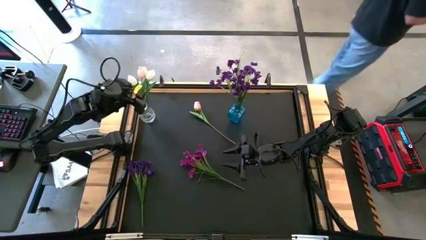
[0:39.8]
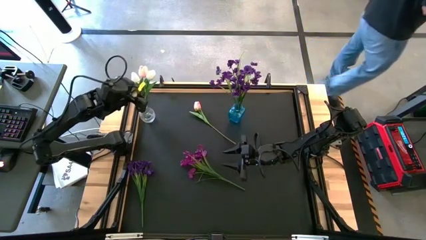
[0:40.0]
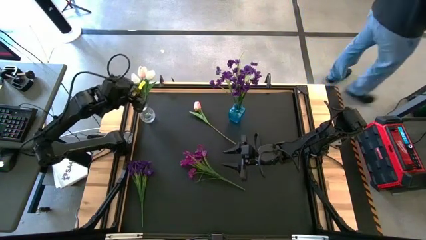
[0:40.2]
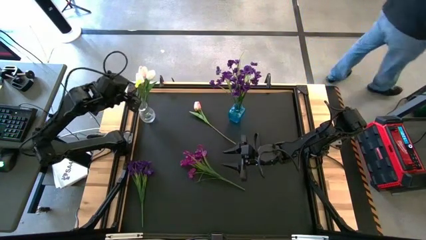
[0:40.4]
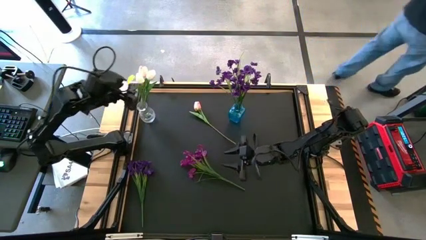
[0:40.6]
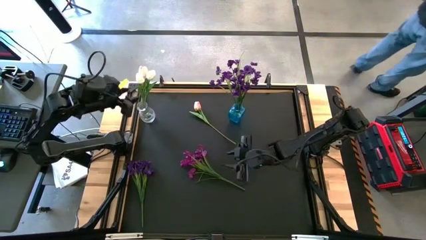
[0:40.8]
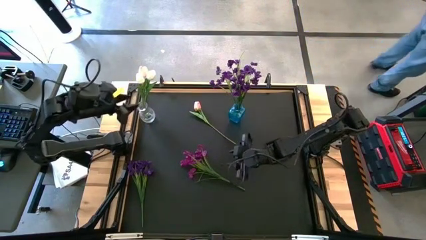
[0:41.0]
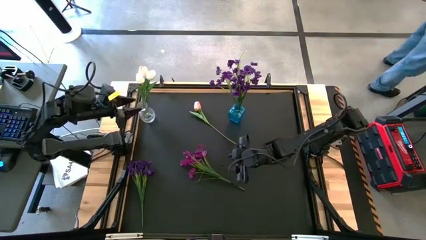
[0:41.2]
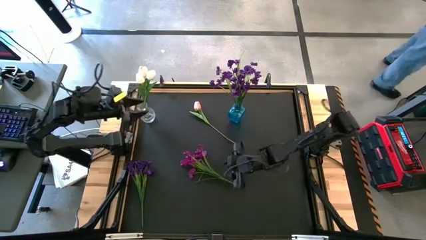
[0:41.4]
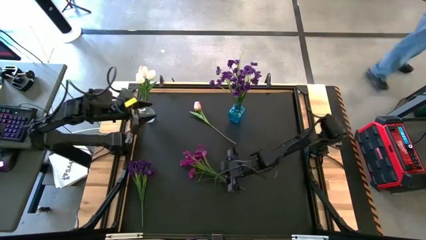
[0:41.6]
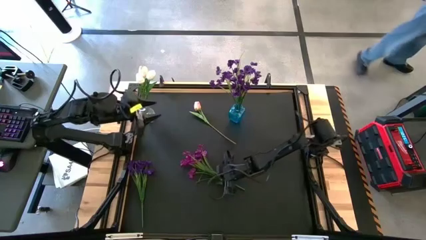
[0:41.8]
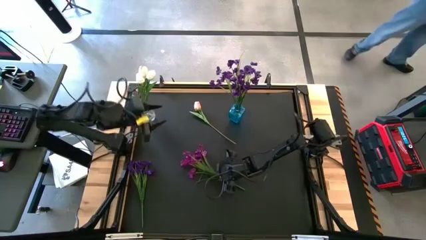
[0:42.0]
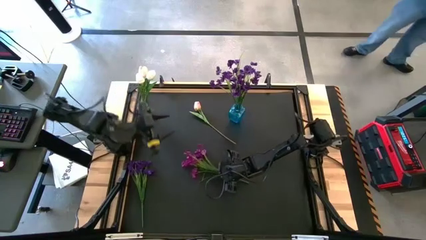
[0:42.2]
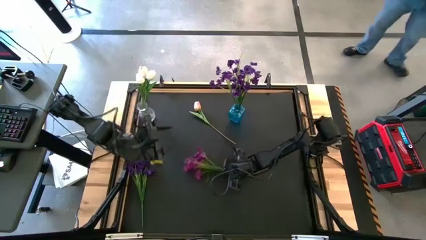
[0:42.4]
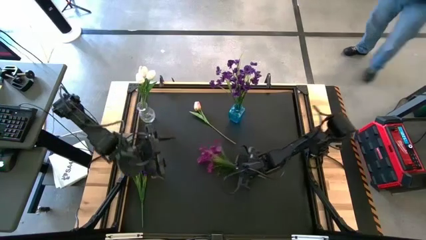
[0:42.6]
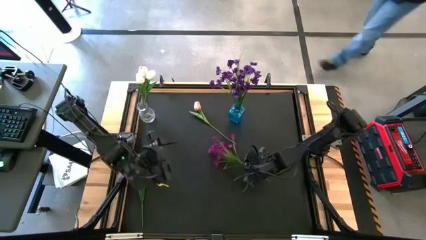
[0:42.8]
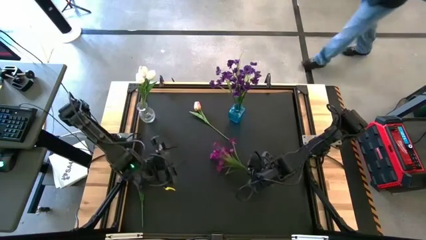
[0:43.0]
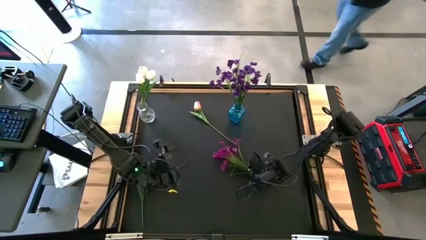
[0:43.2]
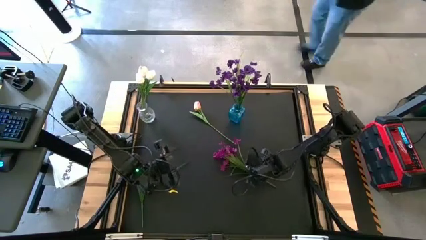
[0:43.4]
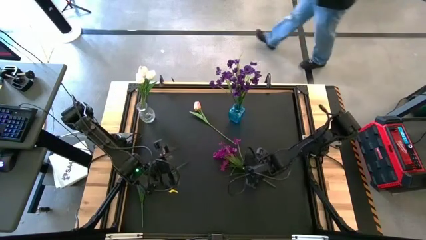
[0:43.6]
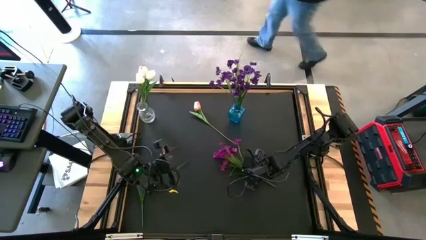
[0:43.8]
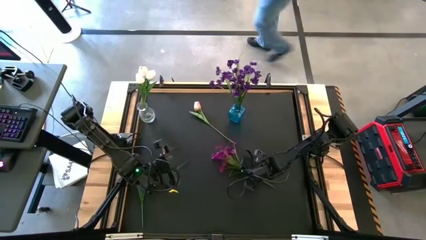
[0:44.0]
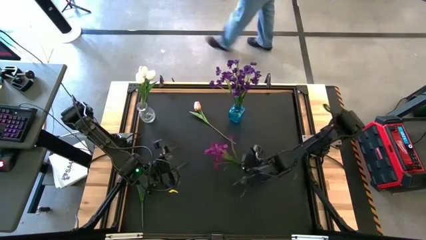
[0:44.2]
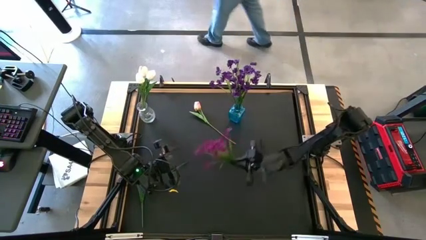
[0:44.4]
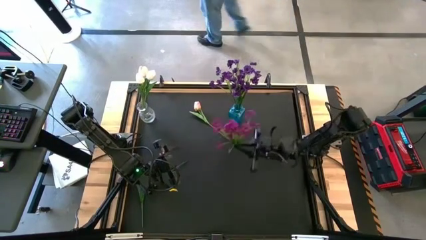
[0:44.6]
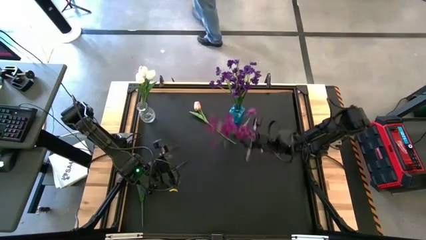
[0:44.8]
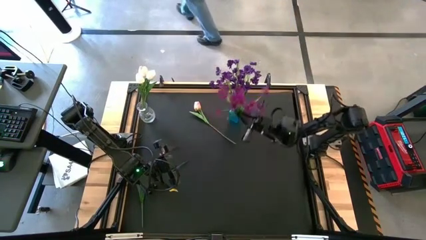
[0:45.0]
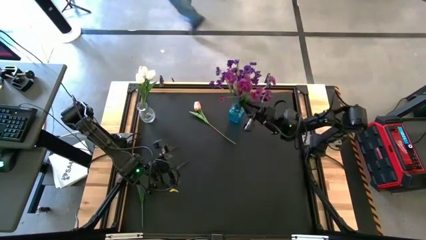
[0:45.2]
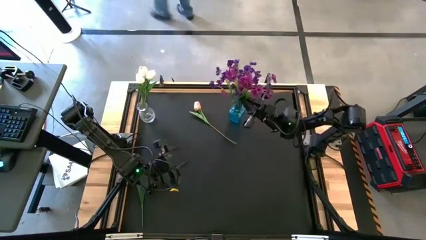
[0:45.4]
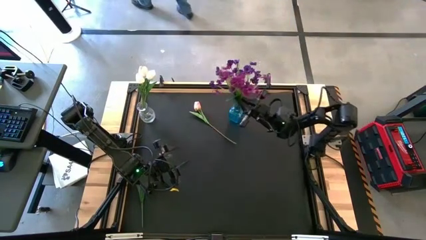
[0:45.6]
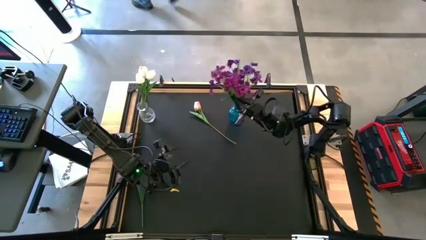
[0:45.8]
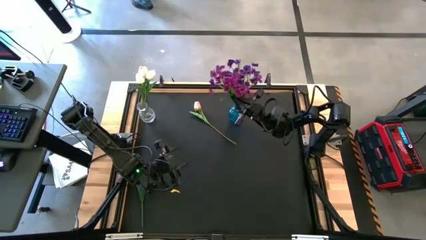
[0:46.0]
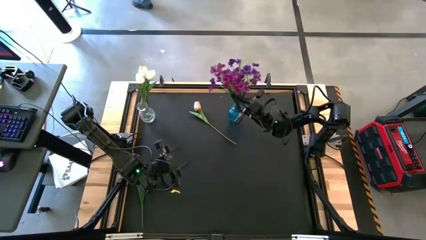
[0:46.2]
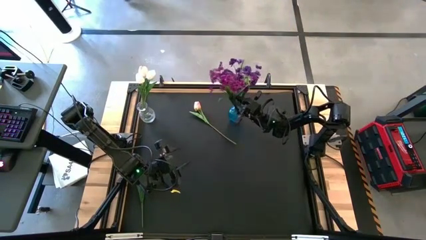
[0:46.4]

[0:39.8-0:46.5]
Task: Sort flowers into vase by color
Put the dark pink flowers into the blue vase

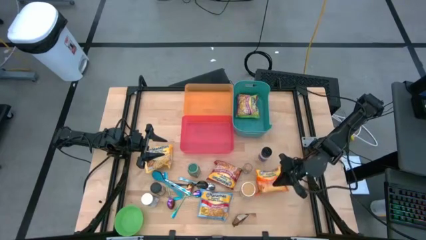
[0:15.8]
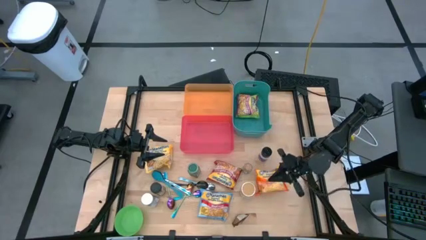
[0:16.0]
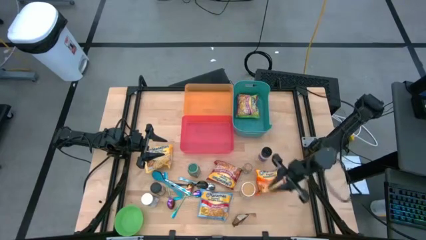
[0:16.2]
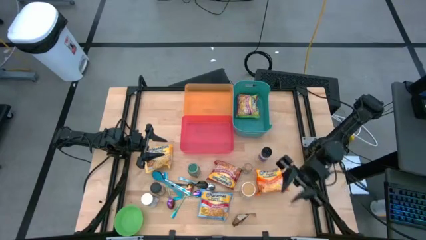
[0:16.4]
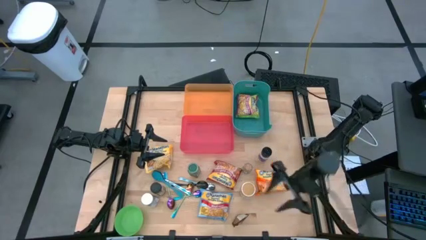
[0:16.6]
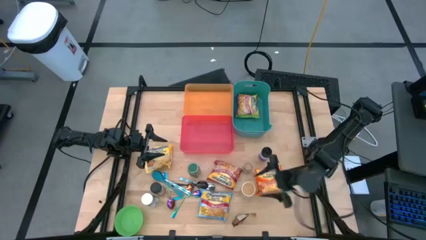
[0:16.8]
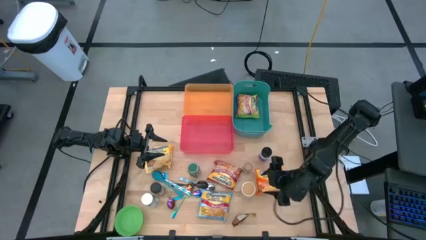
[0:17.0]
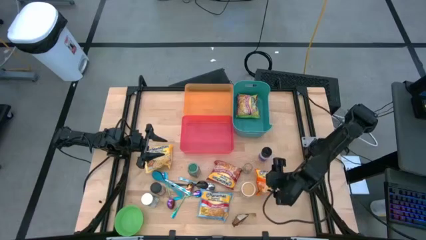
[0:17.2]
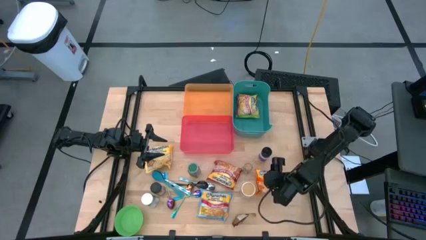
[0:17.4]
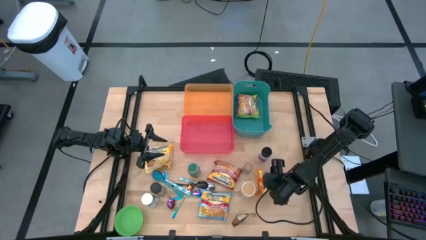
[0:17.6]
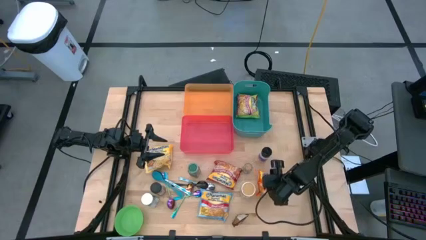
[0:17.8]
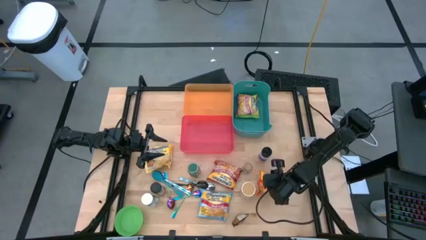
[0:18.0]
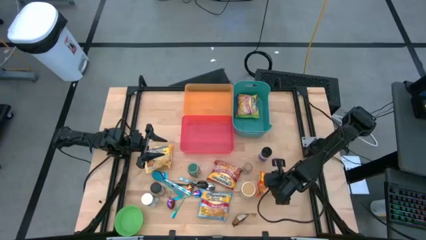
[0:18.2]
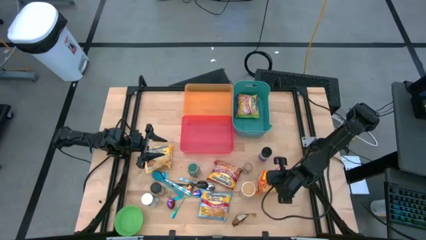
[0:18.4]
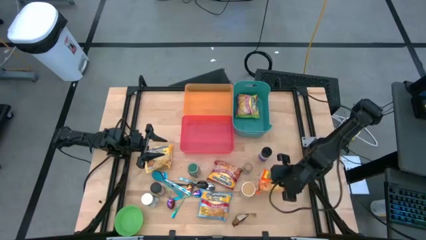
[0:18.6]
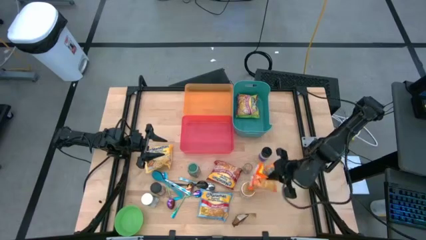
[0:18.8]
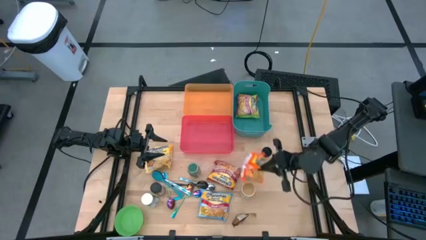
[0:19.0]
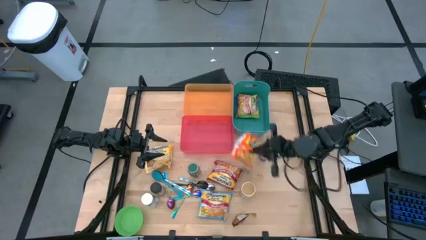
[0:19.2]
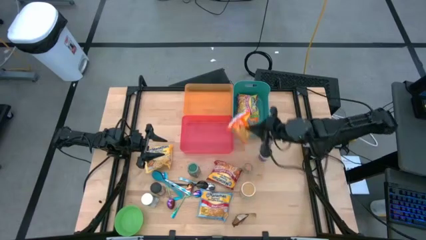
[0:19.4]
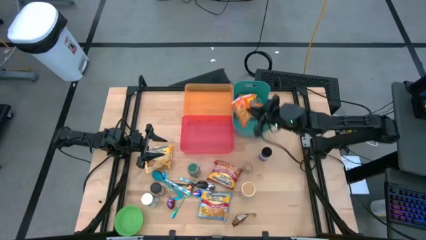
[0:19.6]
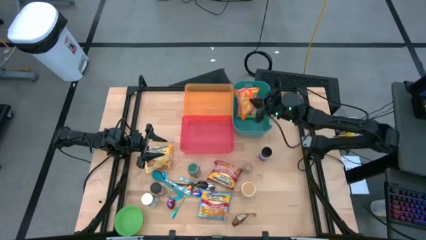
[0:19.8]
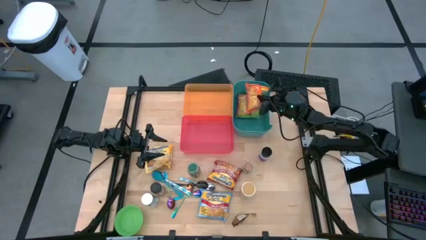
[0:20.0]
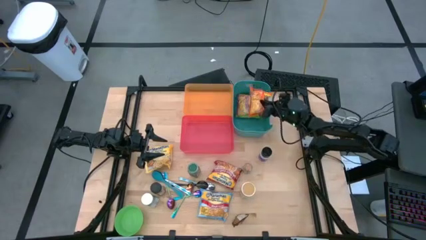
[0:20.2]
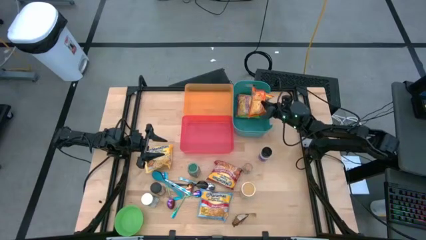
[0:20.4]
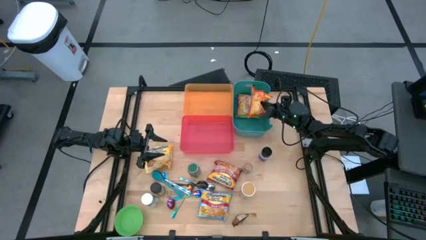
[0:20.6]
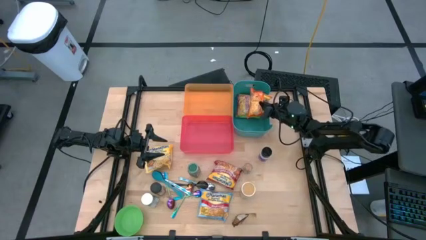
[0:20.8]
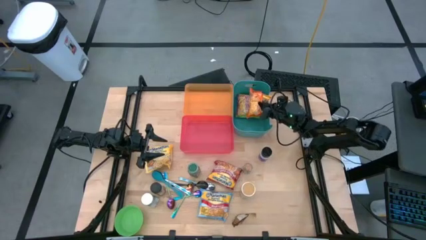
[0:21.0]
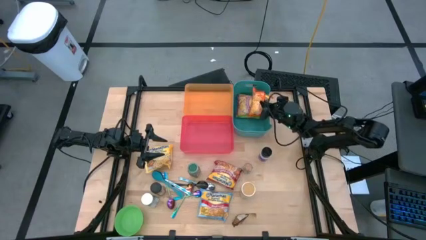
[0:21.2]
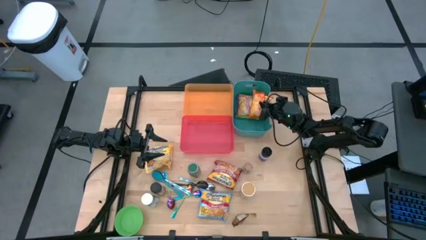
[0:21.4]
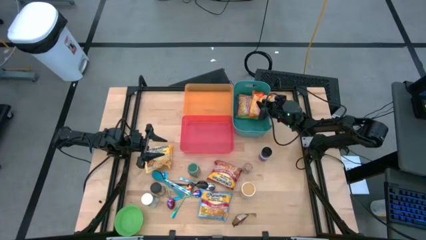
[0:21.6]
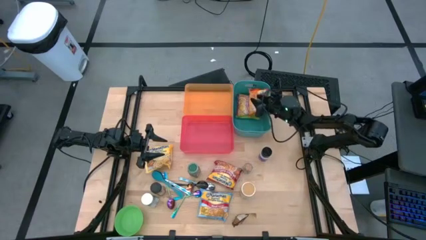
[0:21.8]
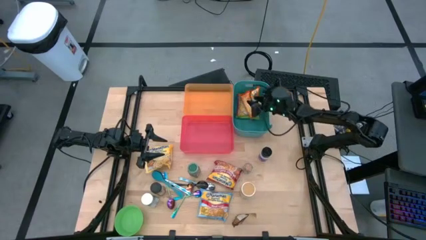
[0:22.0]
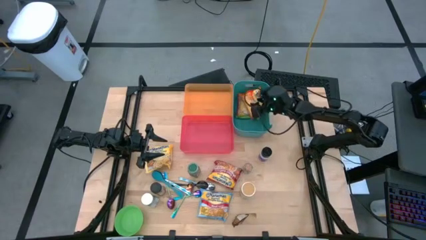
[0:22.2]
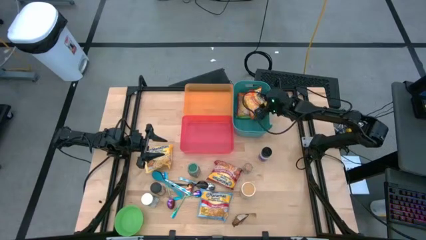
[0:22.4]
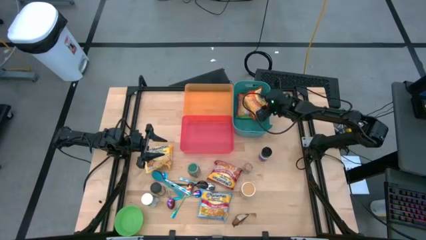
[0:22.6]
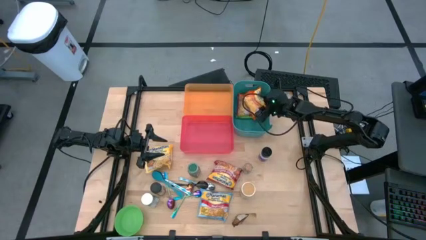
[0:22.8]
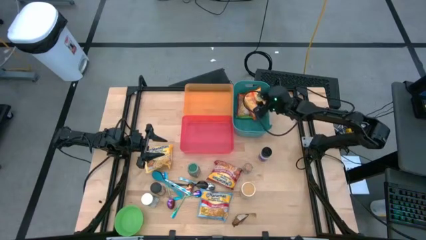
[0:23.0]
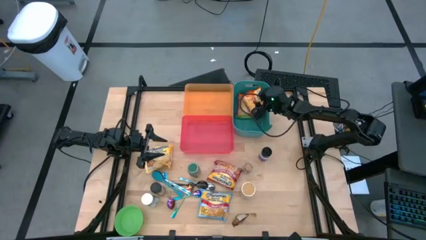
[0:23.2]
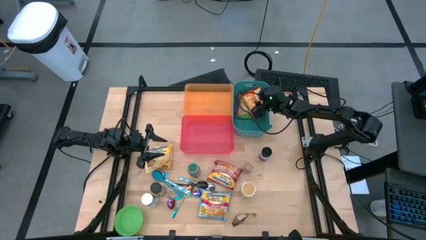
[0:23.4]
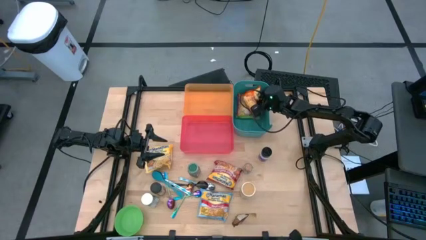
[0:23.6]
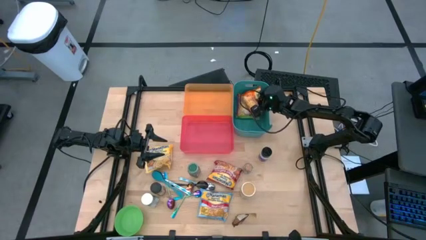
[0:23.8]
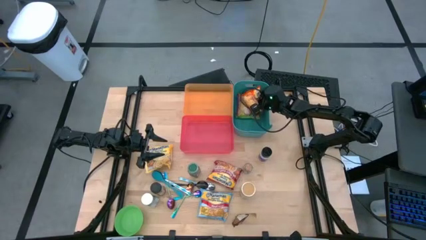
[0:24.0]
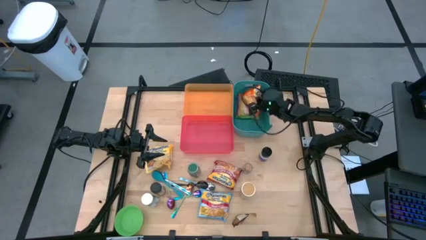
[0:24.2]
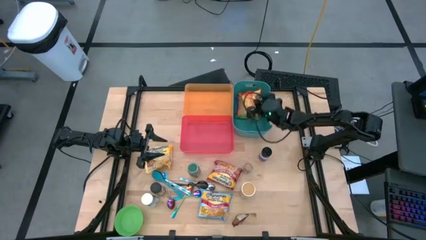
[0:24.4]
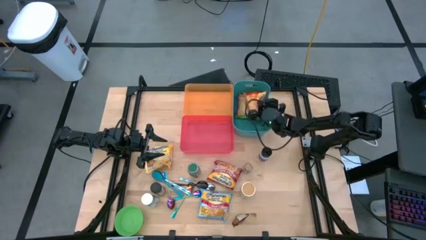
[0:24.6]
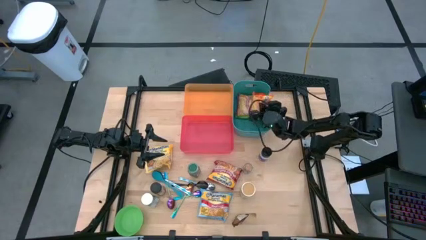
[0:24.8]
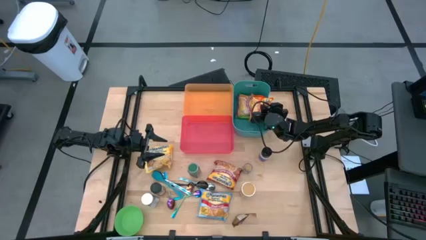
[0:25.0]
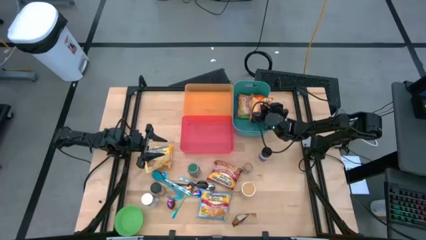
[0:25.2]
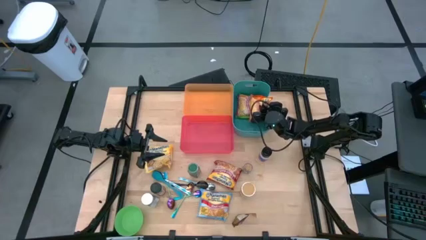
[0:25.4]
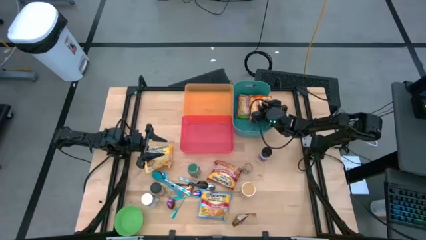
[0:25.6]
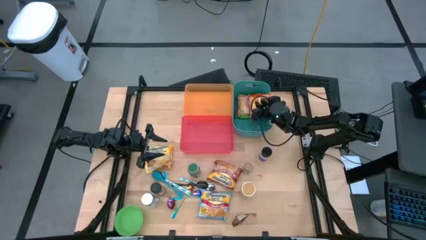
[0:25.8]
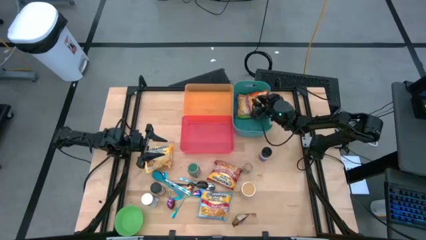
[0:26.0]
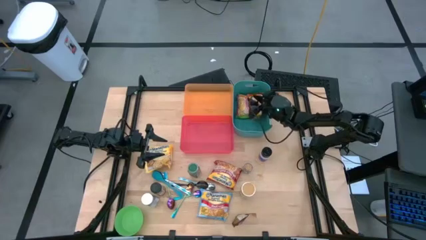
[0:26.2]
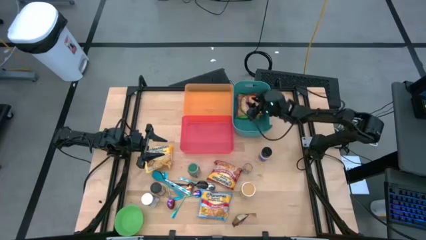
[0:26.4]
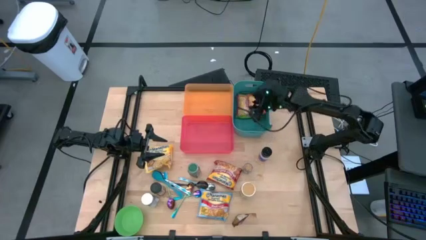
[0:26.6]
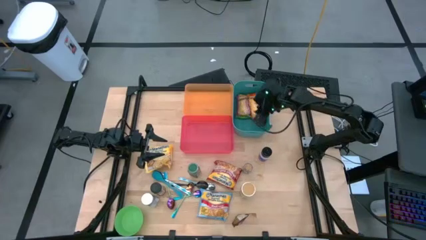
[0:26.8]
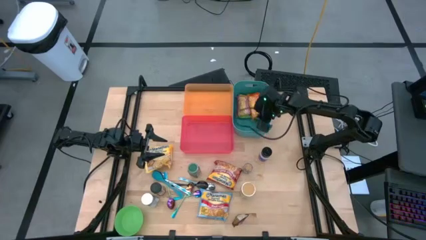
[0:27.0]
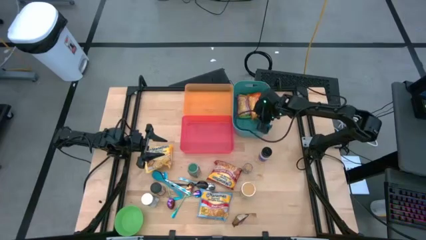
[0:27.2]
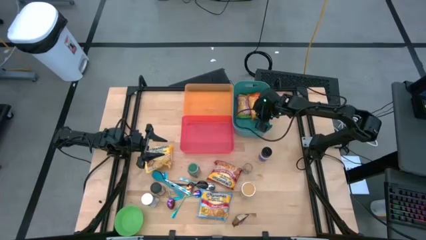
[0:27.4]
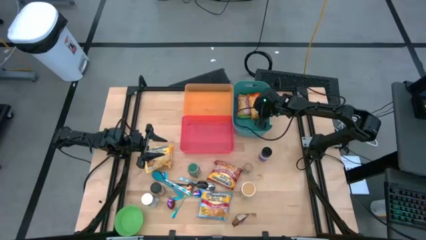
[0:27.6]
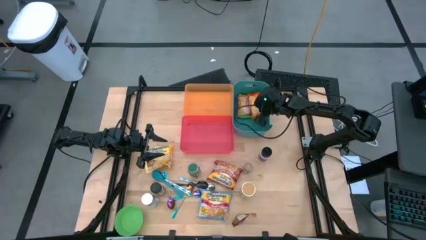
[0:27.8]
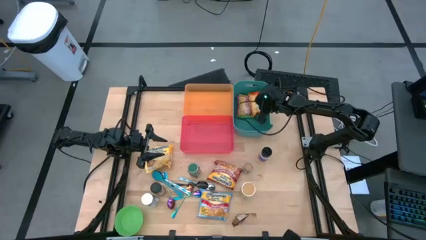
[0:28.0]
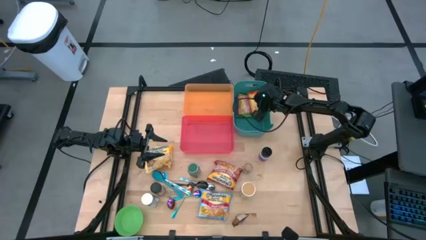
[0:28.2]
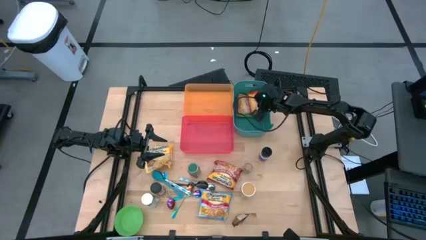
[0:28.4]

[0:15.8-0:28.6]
Task: Pick & Place Food Item
Put the orange noodle pack into the blue bin
